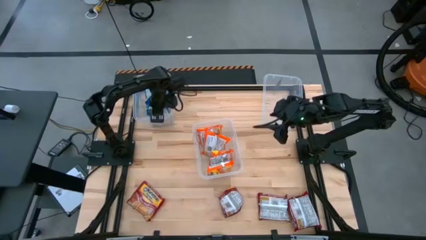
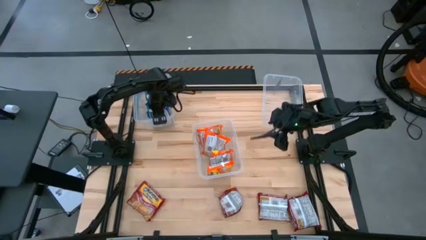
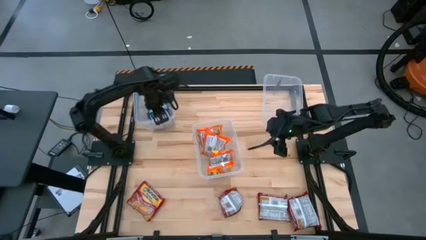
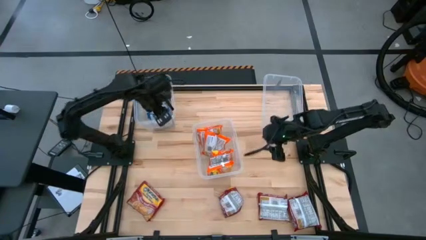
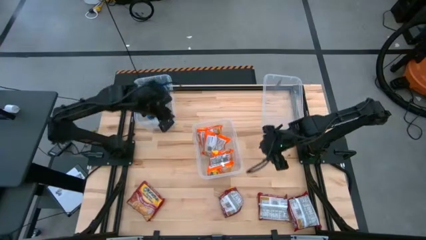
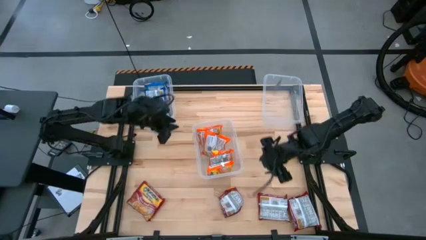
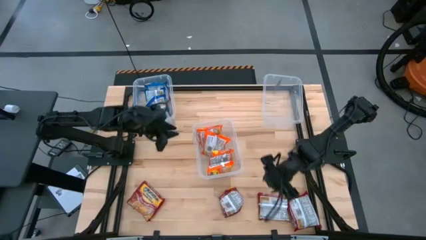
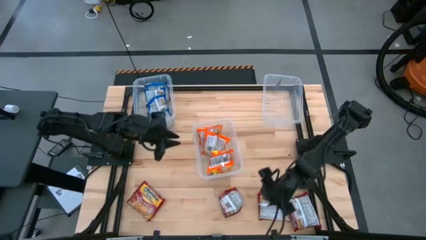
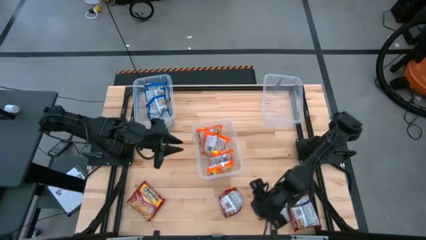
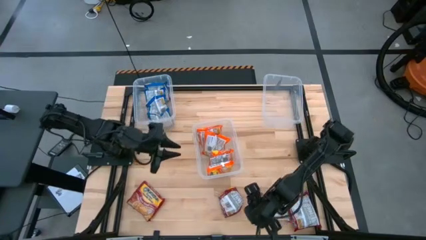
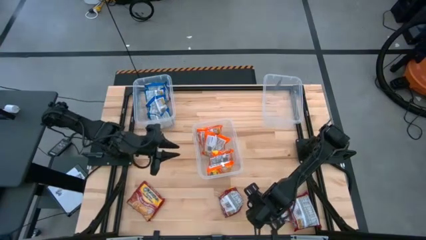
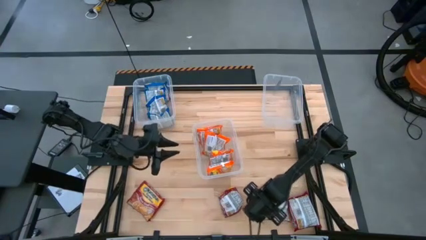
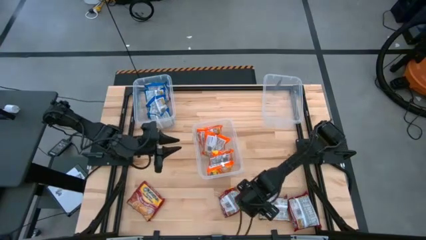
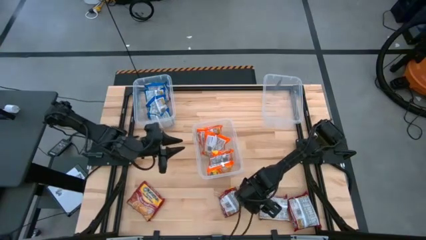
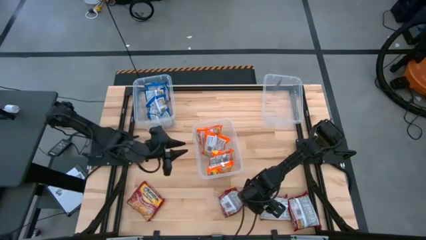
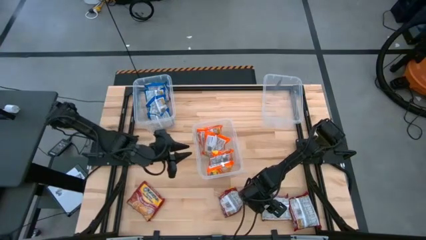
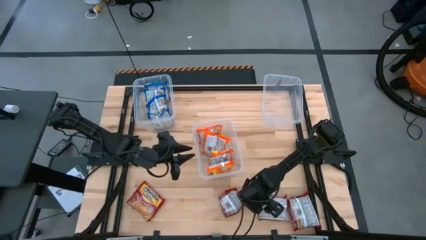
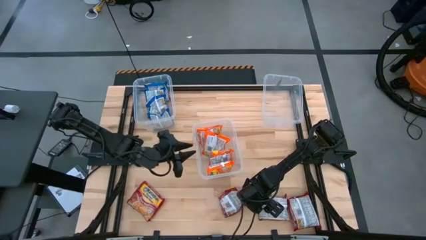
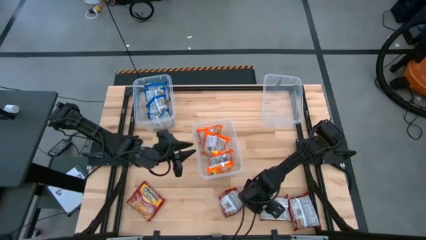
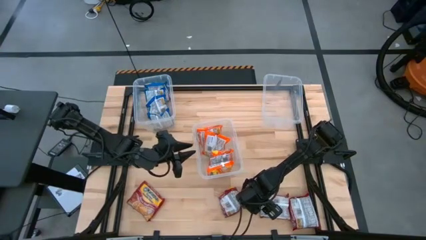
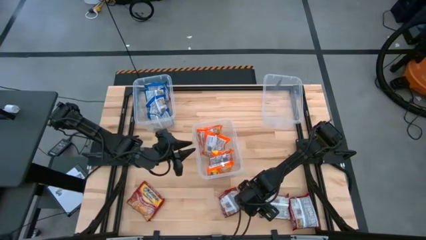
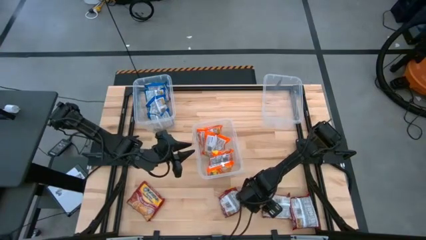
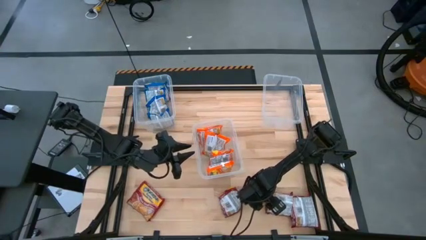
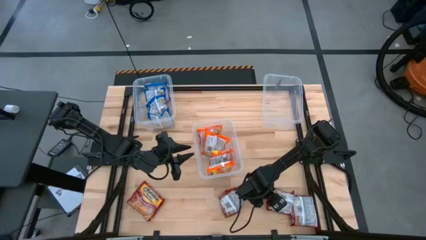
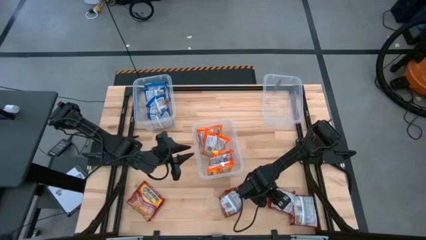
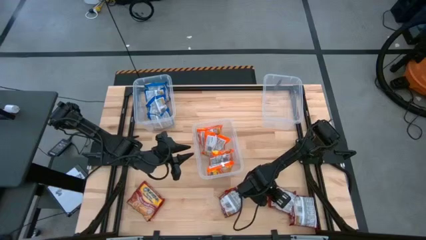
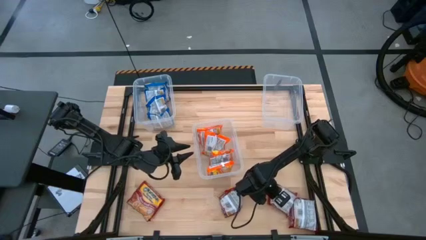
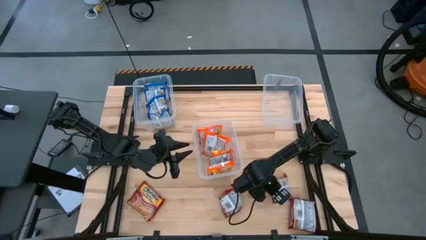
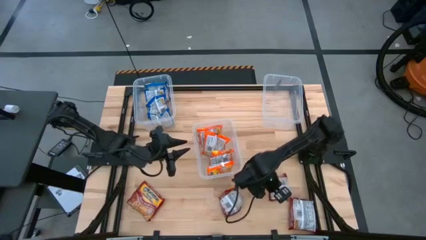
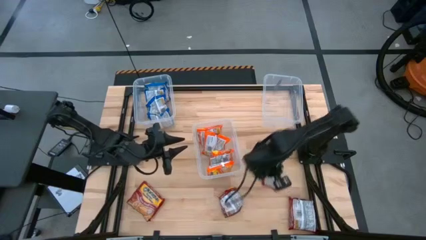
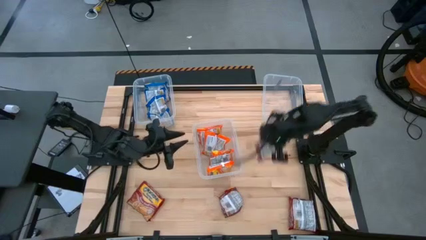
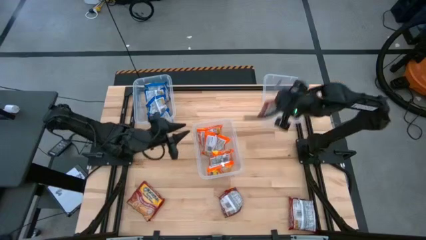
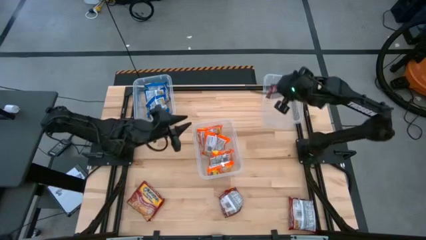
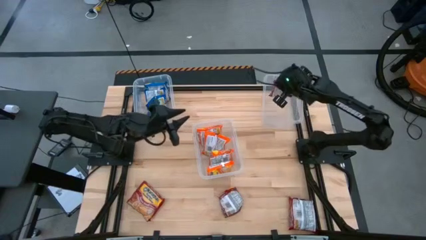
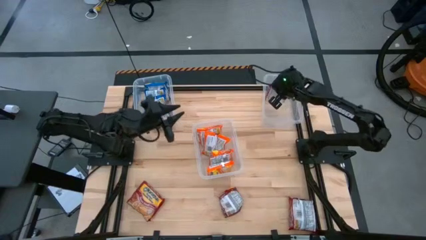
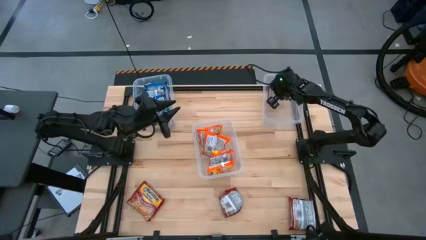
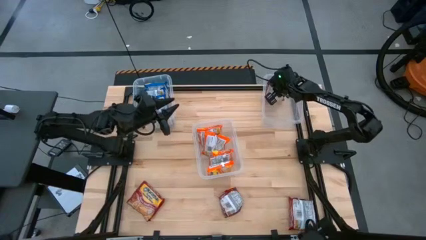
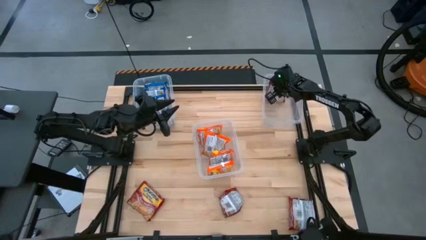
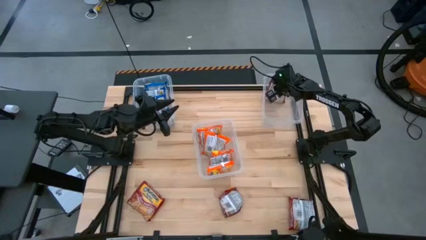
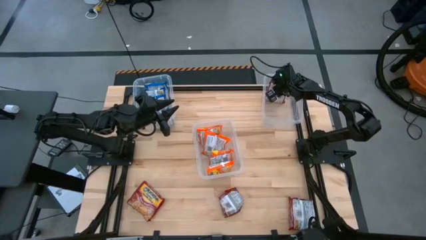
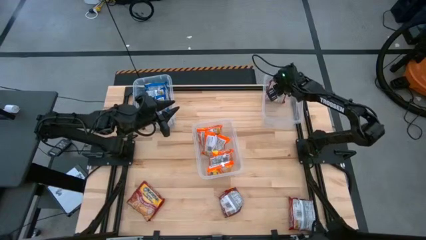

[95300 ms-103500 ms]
Task: Sort Maruchan noodles
Put the red noodle pack into the right transparent bin

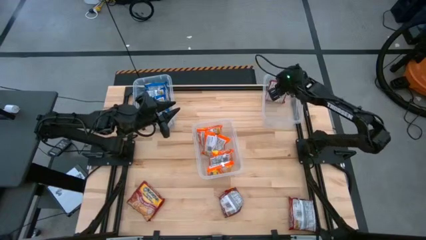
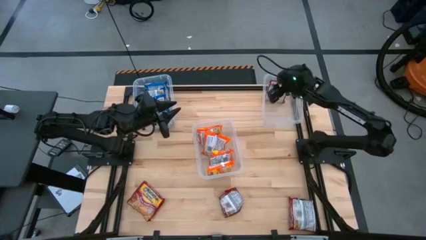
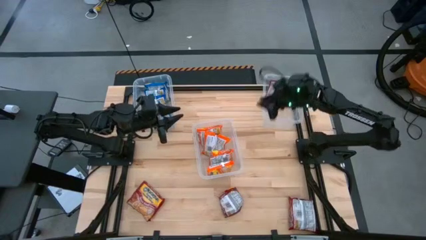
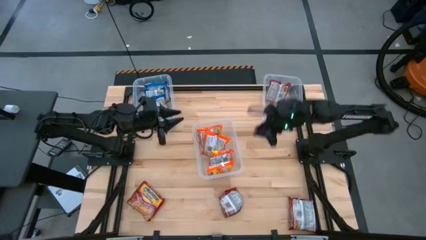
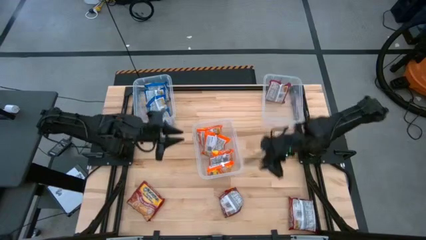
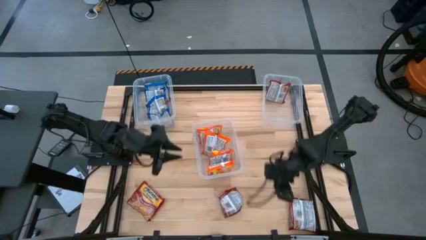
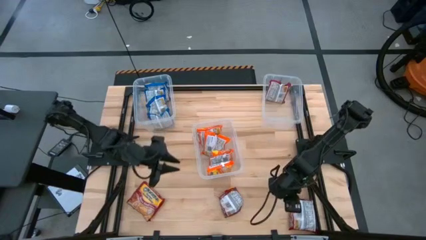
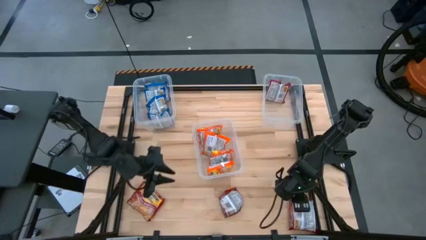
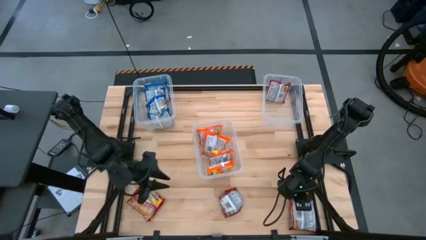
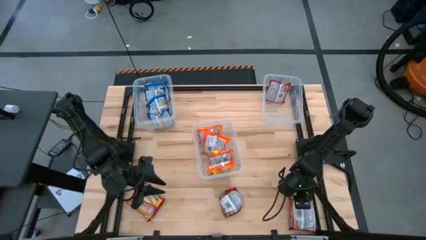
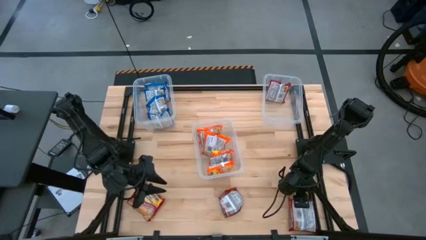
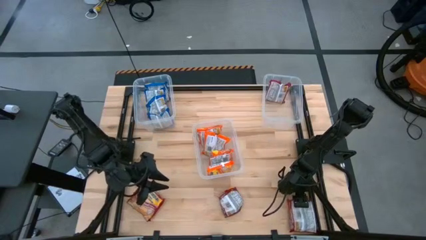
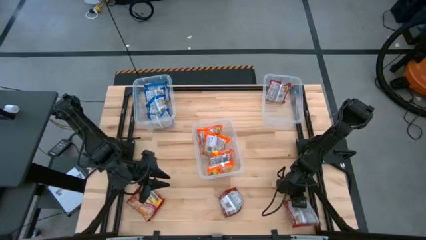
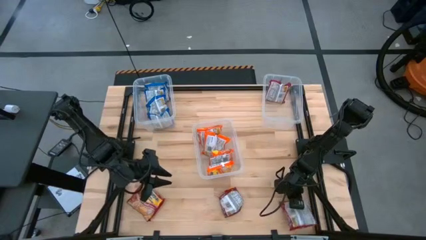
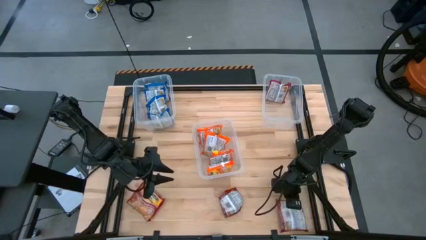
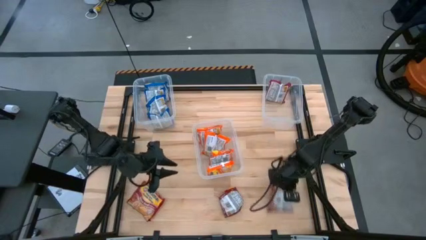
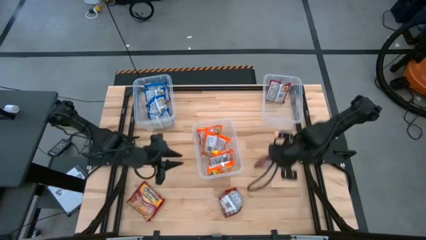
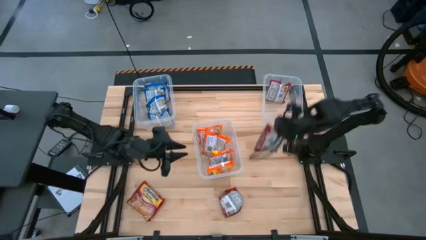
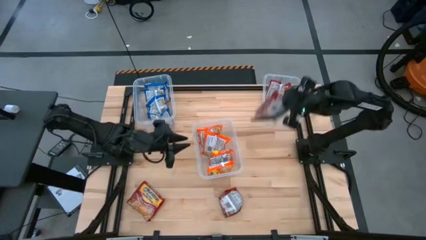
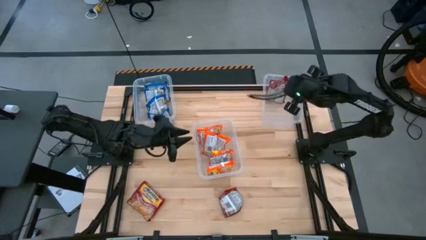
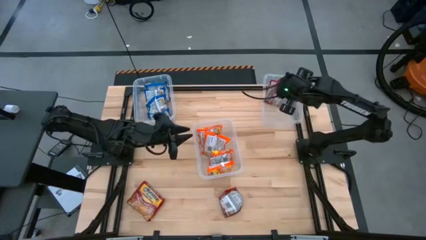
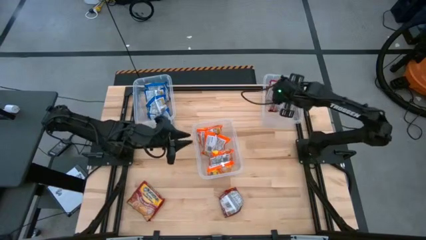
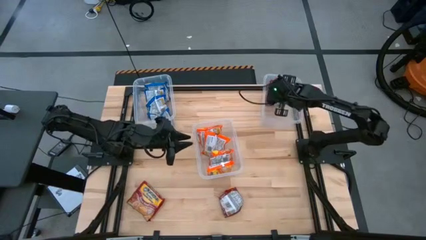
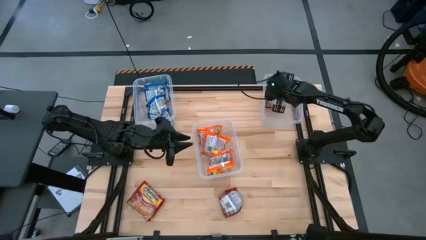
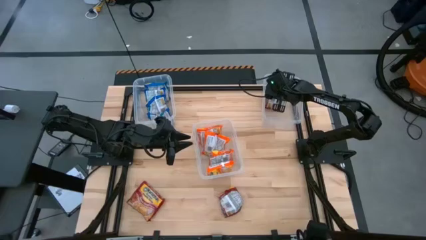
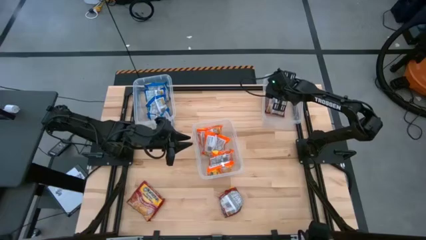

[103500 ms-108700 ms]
Put the red noodle pack into the right transparent bin
